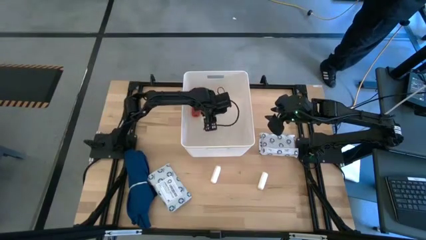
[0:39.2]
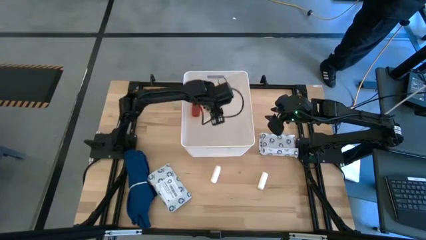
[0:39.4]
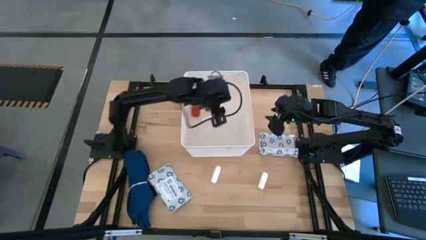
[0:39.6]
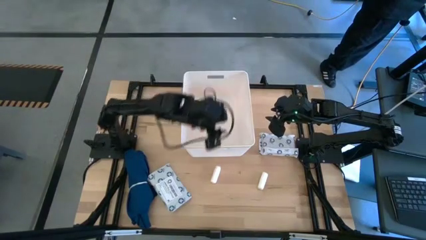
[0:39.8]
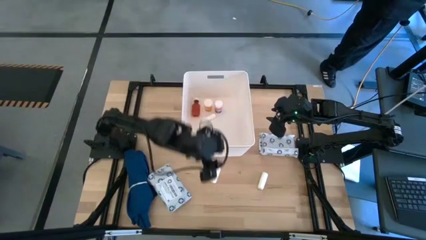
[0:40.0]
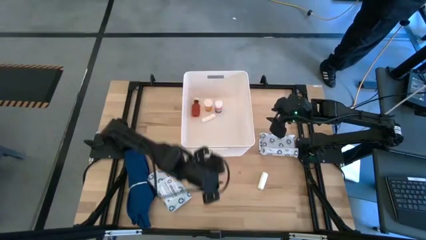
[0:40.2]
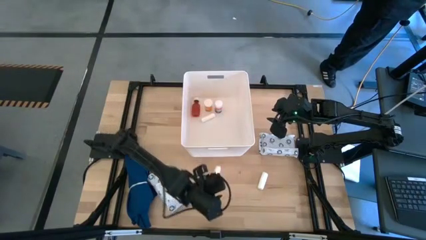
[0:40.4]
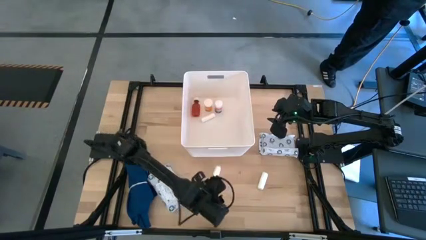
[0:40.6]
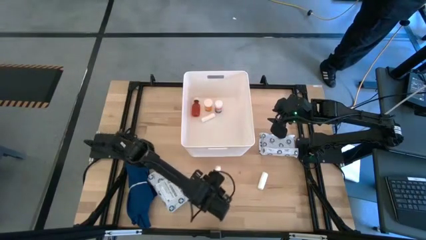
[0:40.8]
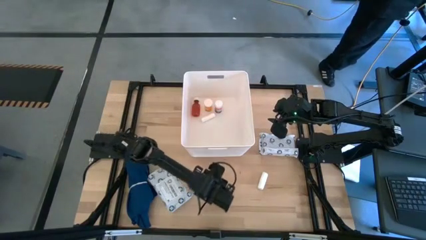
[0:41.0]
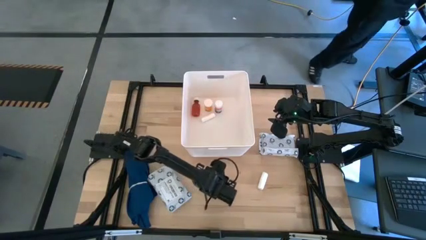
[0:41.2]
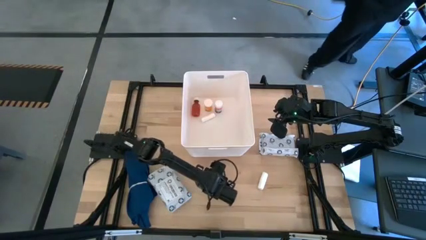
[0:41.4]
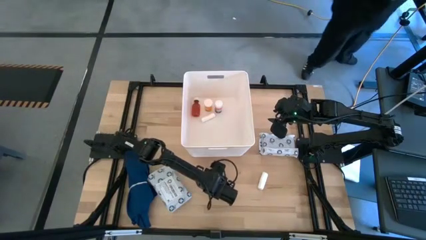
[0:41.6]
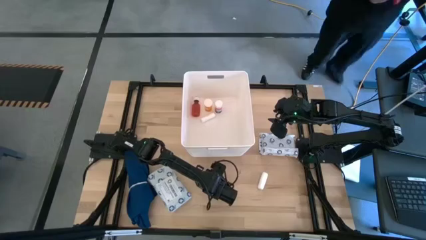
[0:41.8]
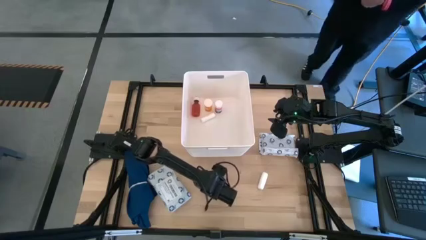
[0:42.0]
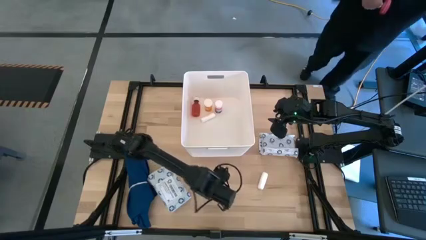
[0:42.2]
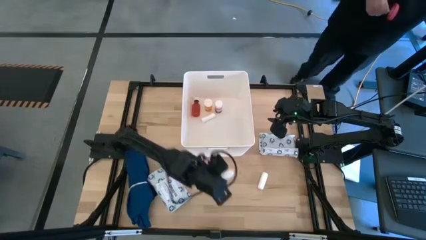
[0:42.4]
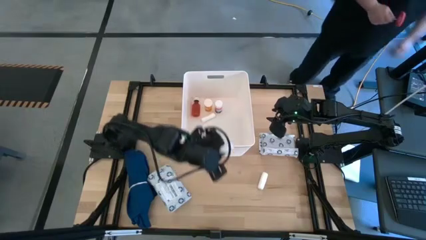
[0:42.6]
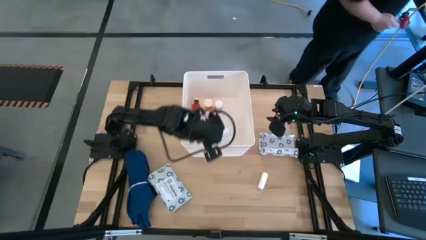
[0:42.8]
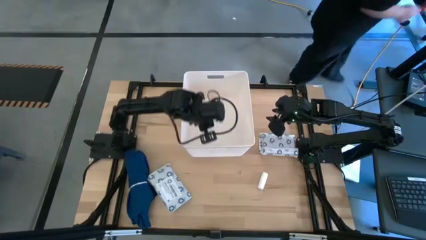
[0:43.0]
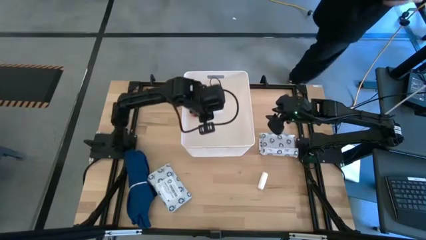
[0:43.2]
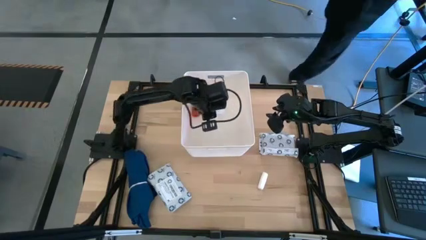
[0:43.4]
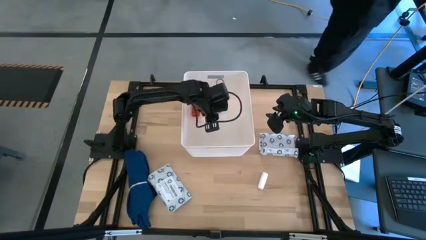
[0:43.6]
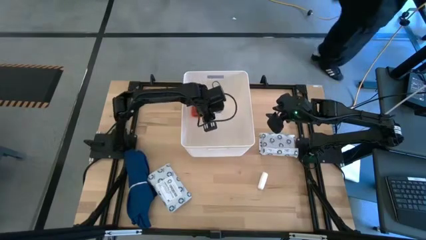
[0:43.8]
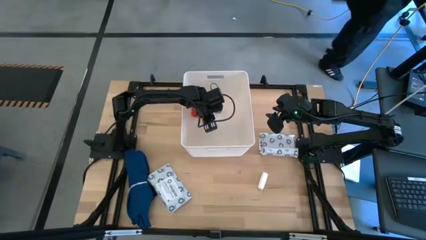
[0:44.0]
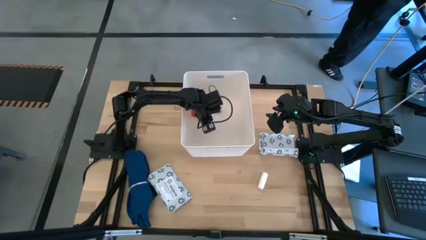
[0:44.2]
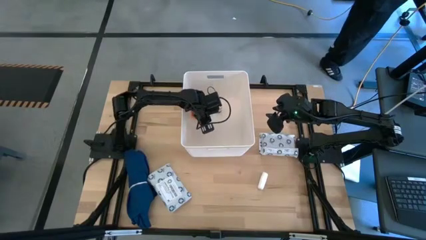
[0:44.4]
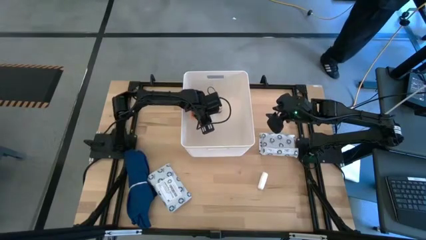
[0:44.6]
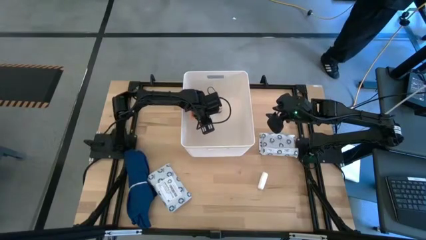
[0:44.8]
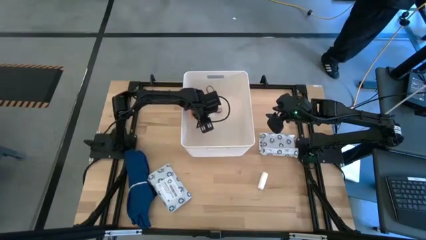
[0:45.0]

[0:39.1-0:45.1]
Task: Pick & place medical supplies in basket/bin
Put the middle rolled gauze into the white bin

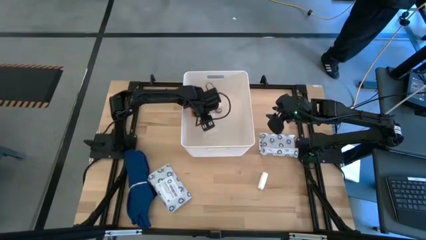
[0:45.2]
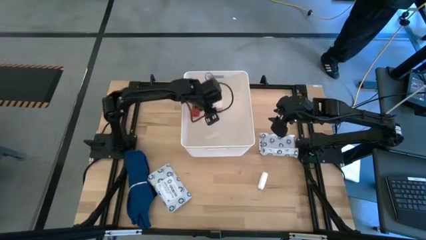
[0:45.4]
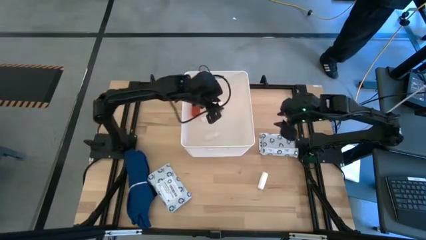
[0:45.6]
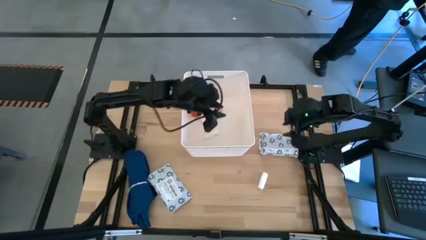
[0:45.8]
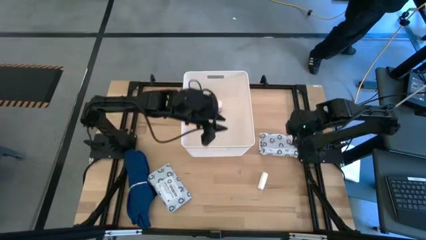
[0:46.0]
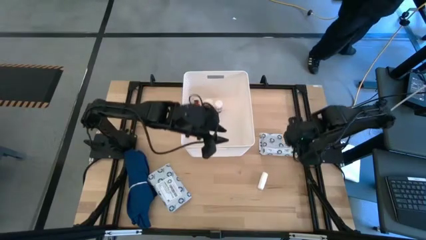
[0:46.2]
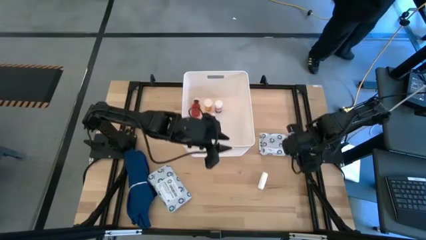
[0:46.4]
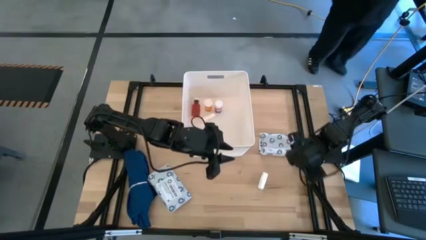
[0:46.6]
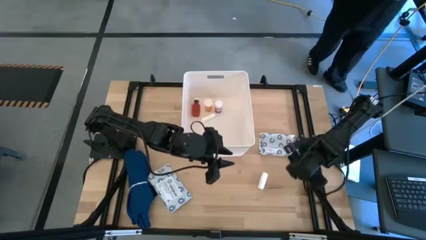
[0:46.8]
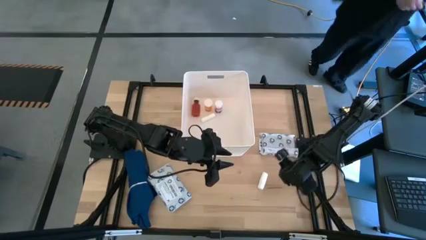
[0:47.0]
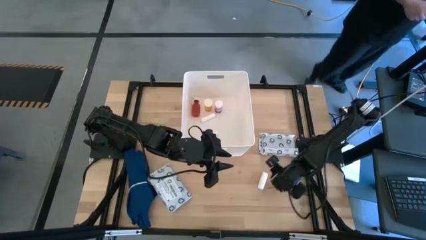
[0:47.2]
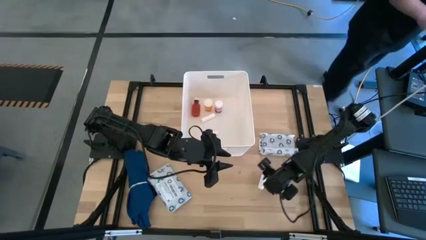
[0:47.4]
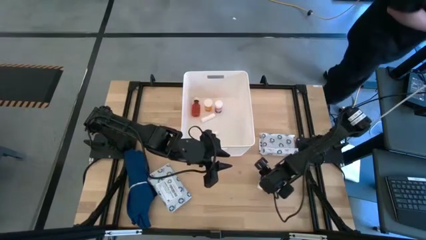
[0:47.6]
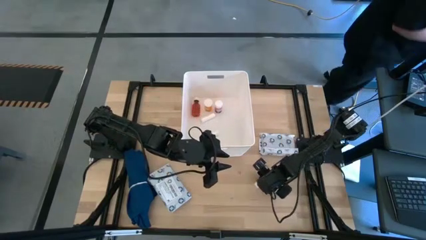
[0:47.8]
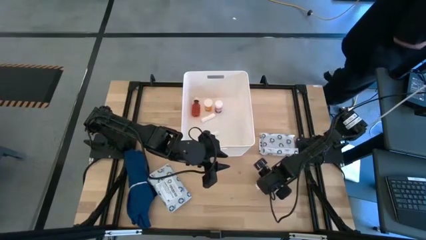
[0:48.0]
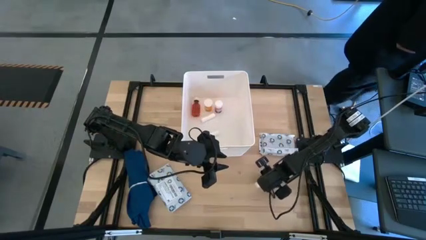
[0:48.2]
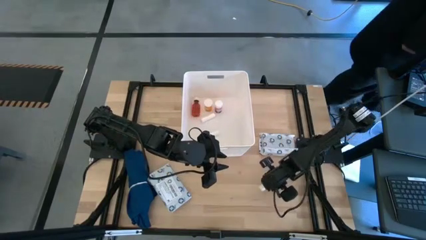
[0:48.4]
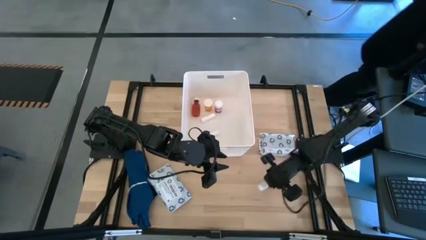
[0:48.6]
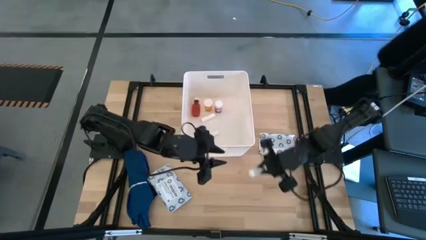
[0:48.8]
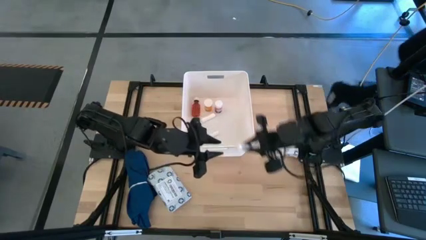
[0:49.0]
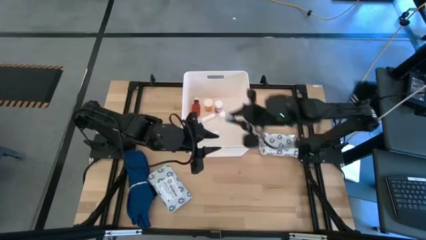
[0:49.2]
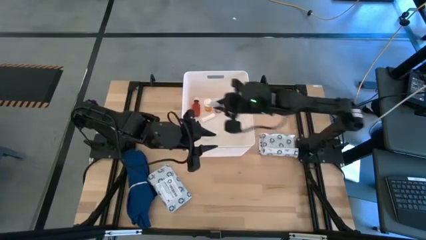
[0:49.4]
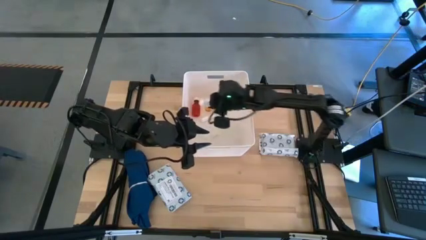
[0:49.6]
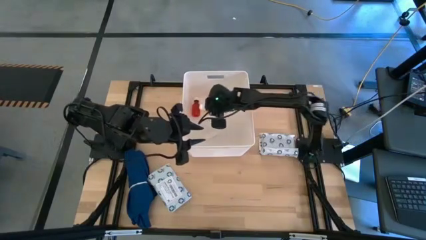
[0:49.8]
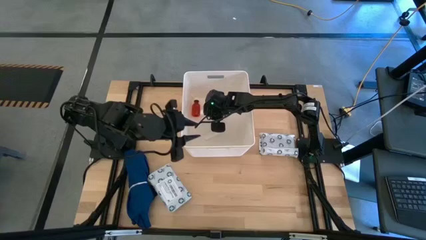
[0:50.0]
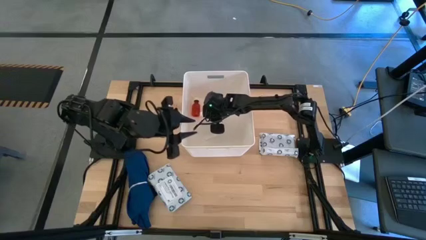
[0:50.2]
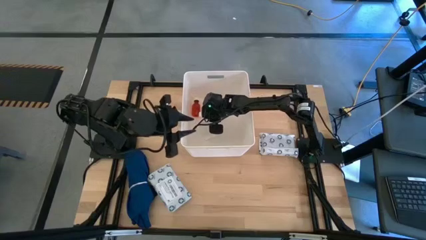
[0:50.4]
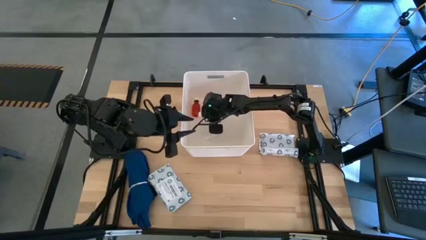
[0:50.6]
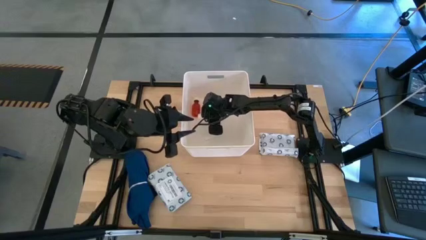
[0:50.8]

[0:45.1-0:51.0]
Put the rolled gauze into the white bin
